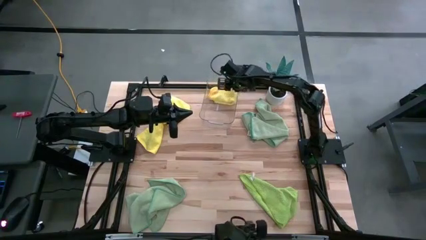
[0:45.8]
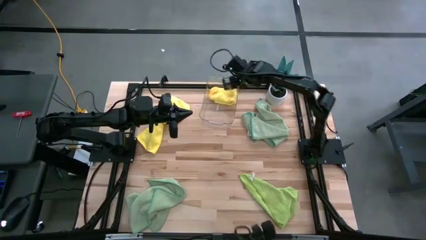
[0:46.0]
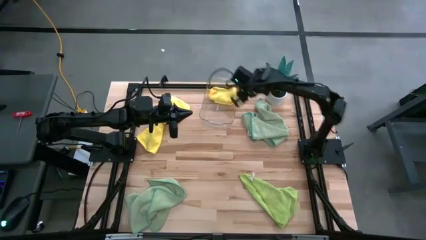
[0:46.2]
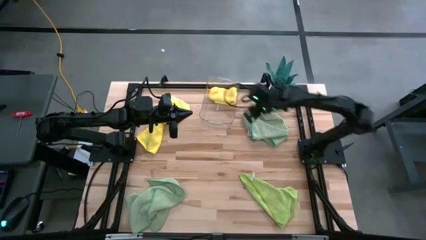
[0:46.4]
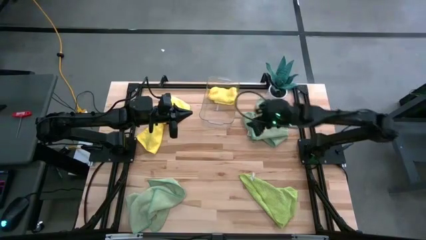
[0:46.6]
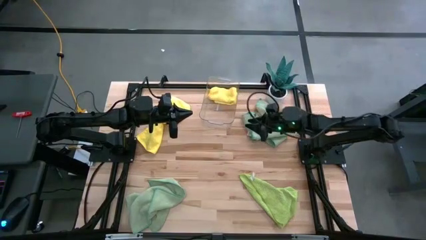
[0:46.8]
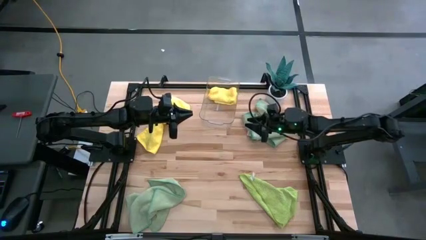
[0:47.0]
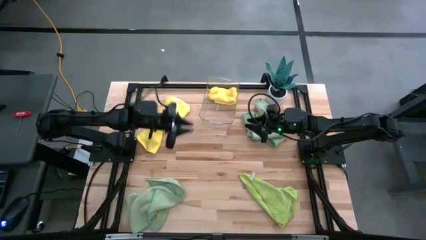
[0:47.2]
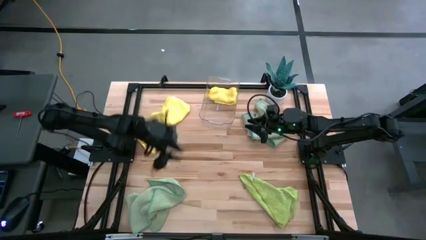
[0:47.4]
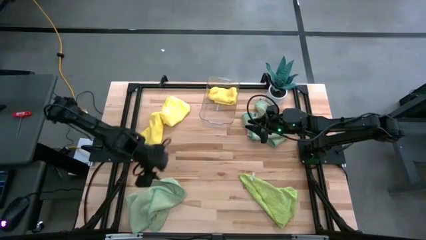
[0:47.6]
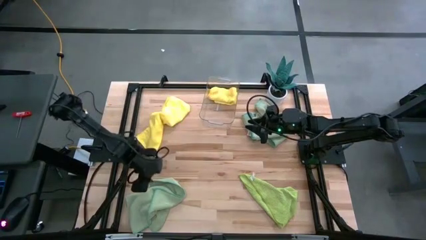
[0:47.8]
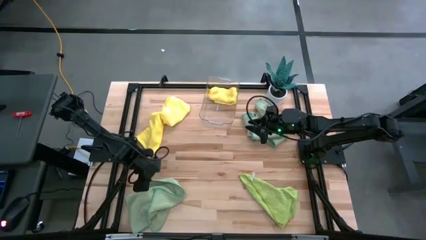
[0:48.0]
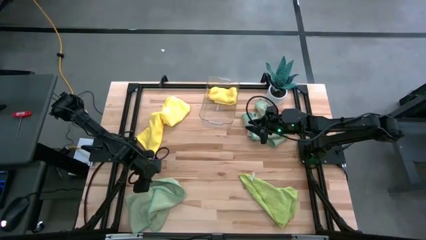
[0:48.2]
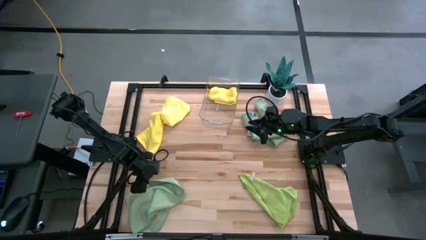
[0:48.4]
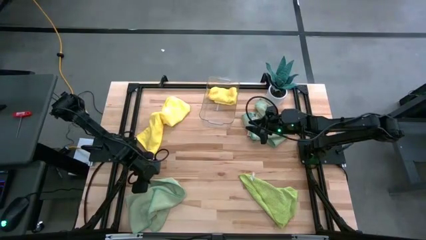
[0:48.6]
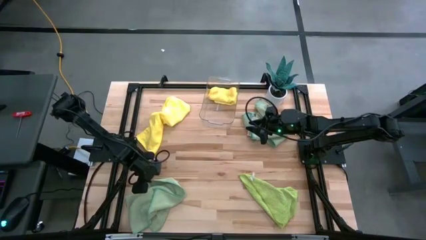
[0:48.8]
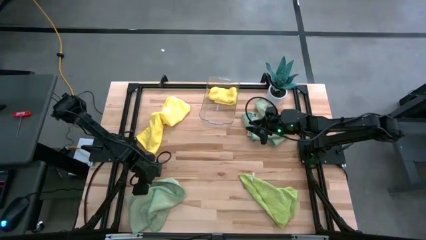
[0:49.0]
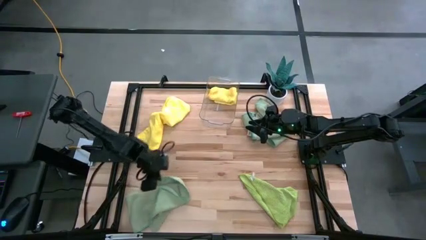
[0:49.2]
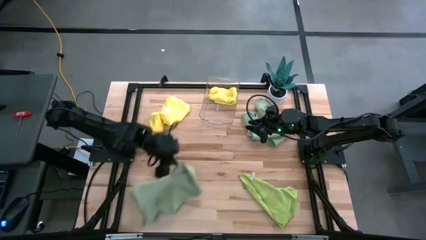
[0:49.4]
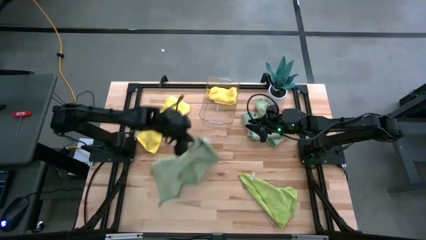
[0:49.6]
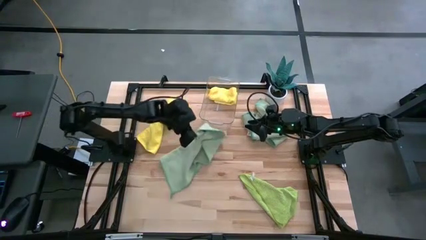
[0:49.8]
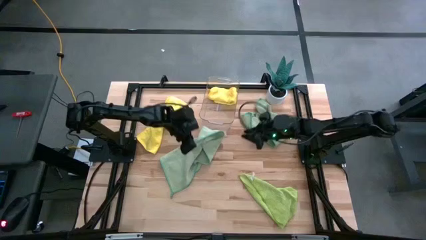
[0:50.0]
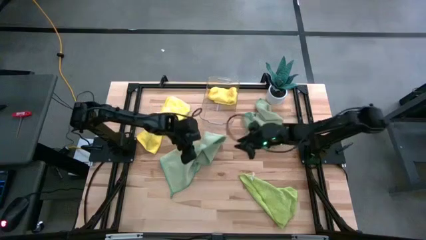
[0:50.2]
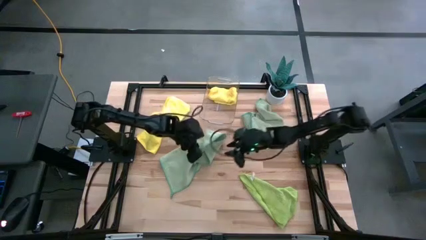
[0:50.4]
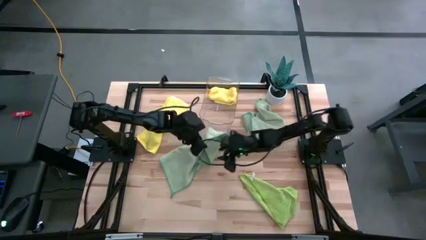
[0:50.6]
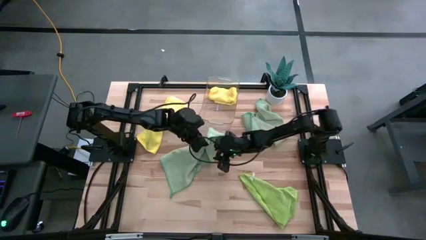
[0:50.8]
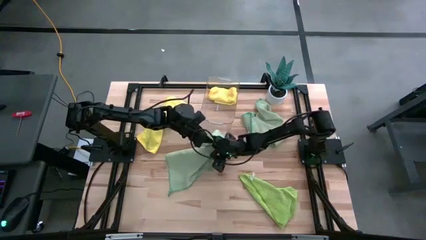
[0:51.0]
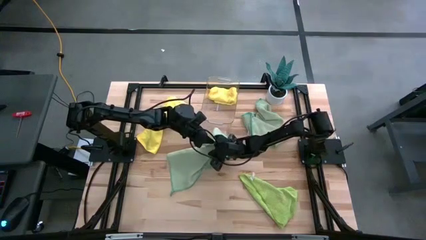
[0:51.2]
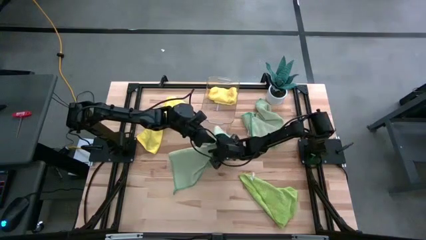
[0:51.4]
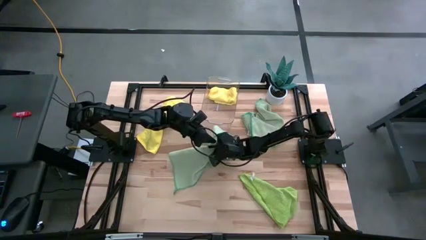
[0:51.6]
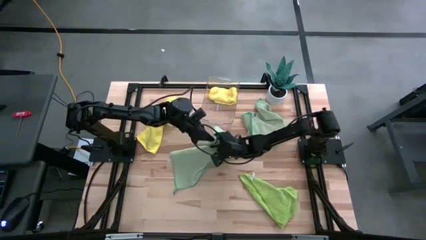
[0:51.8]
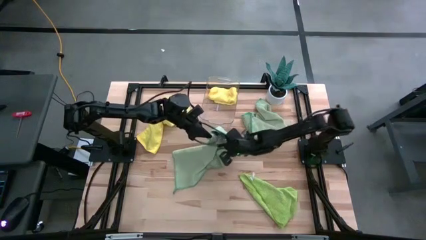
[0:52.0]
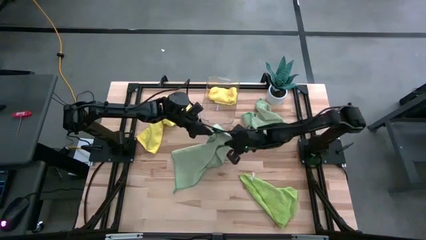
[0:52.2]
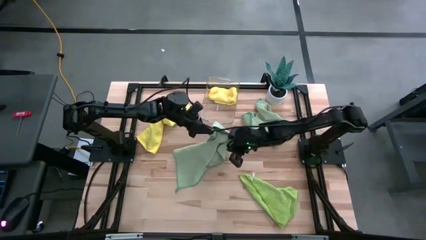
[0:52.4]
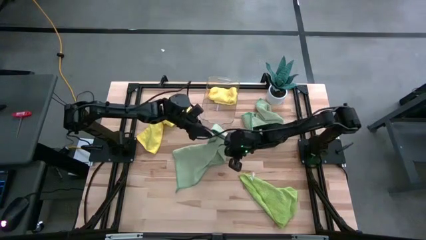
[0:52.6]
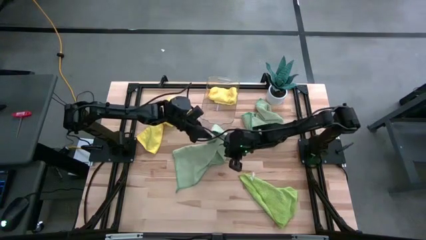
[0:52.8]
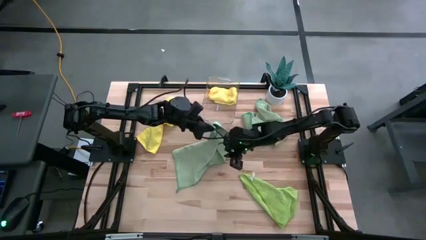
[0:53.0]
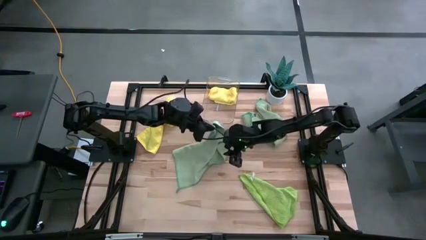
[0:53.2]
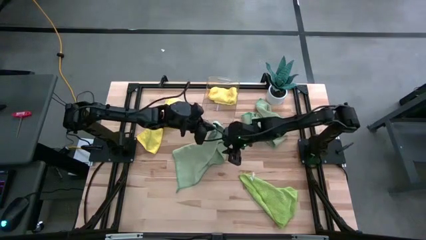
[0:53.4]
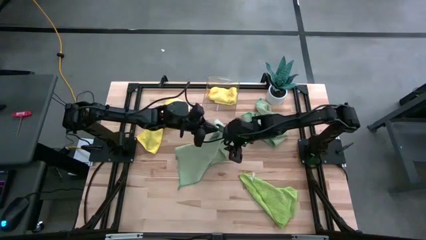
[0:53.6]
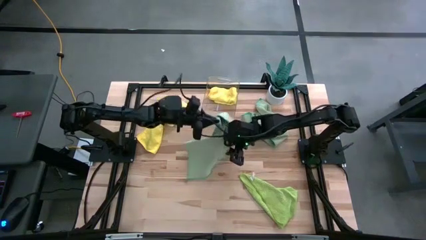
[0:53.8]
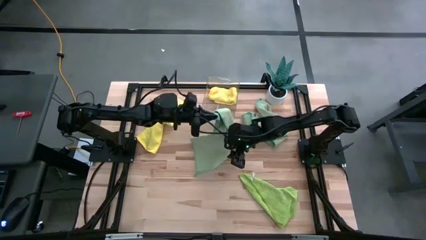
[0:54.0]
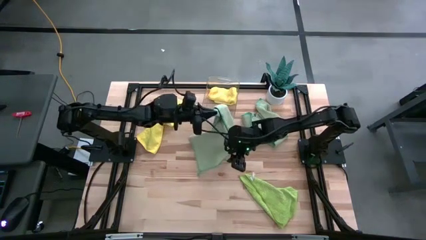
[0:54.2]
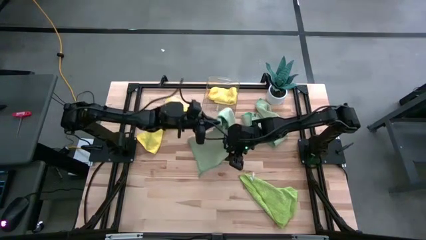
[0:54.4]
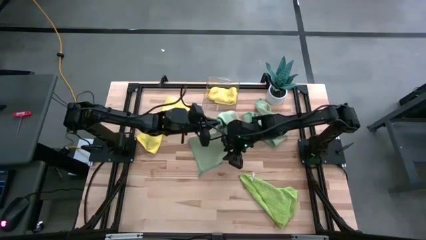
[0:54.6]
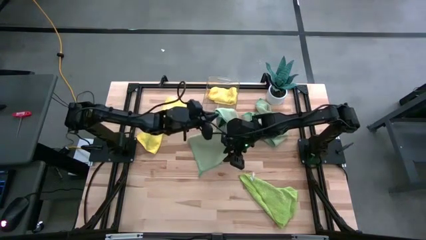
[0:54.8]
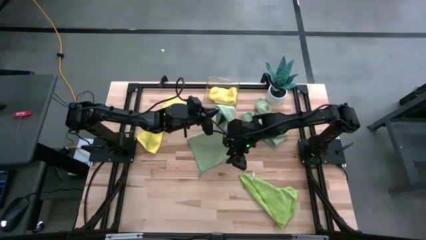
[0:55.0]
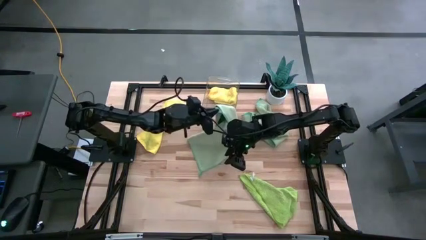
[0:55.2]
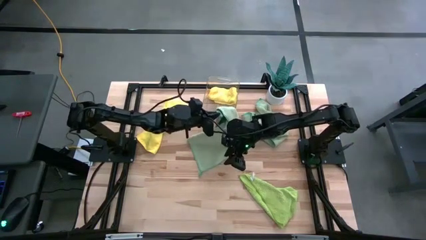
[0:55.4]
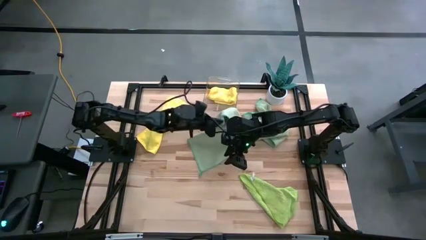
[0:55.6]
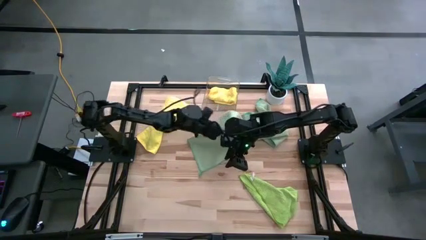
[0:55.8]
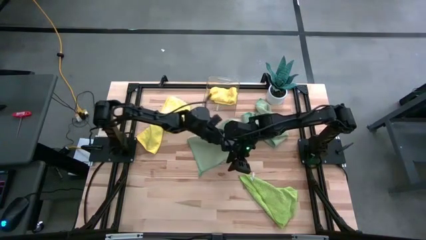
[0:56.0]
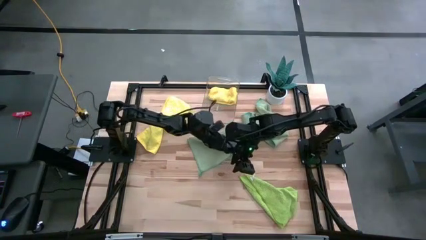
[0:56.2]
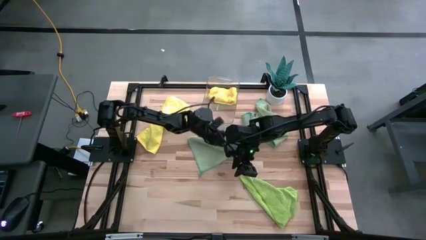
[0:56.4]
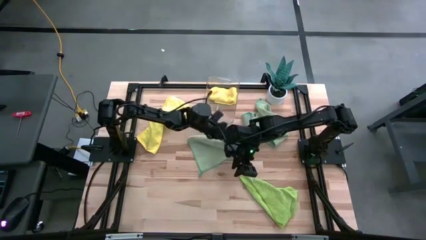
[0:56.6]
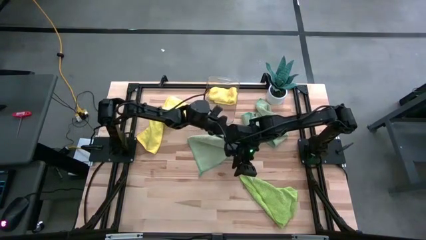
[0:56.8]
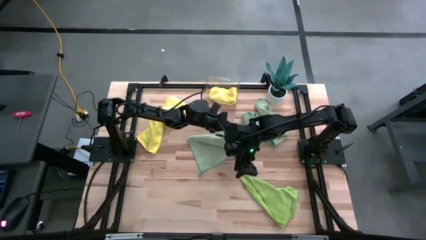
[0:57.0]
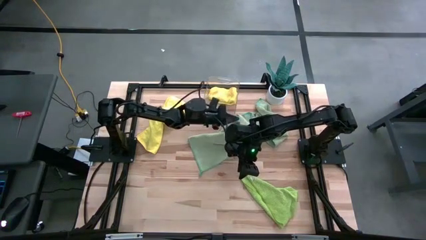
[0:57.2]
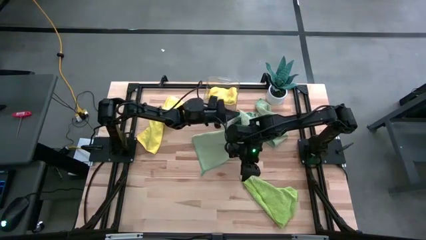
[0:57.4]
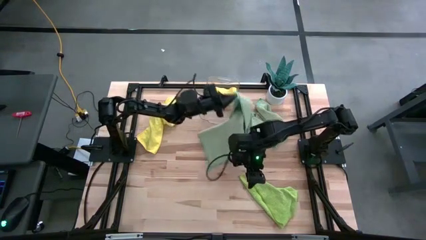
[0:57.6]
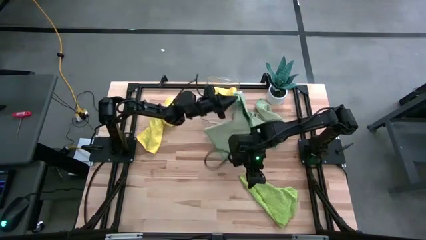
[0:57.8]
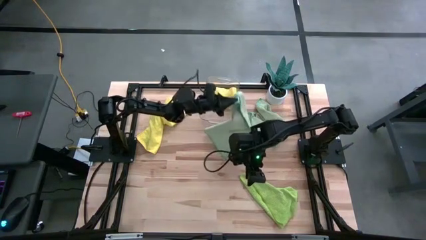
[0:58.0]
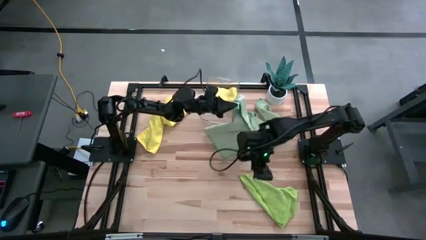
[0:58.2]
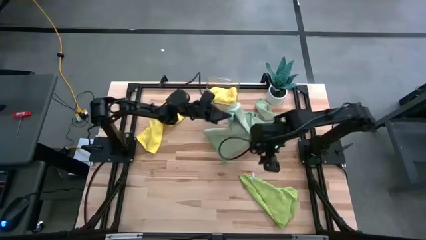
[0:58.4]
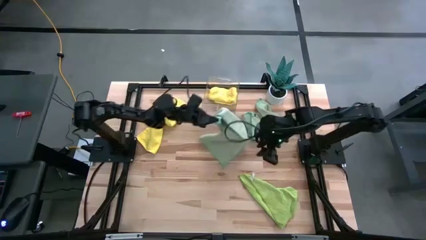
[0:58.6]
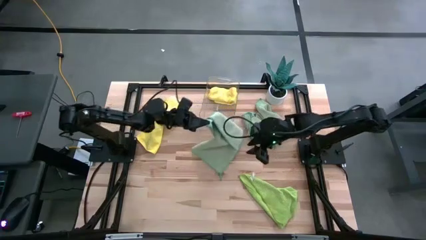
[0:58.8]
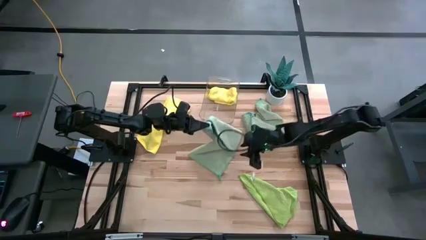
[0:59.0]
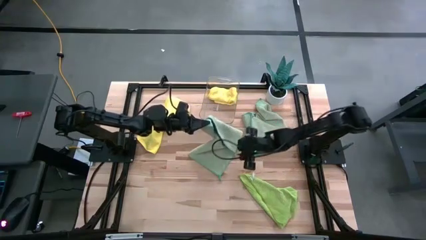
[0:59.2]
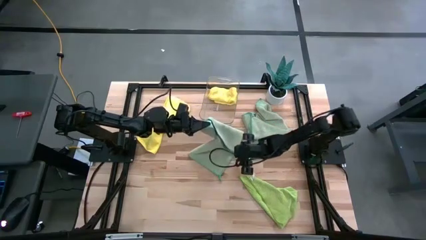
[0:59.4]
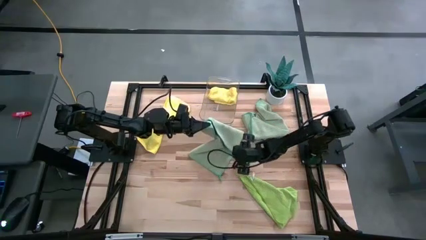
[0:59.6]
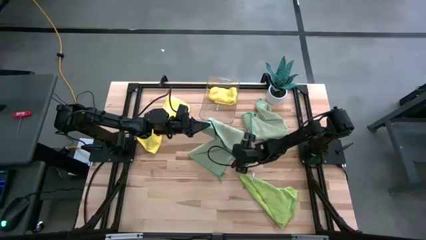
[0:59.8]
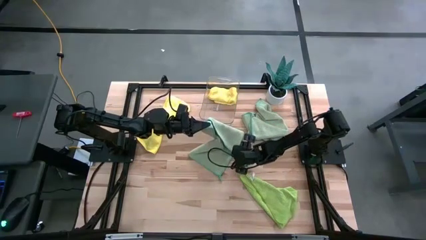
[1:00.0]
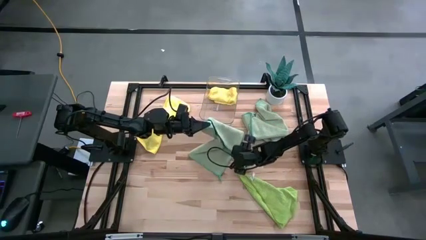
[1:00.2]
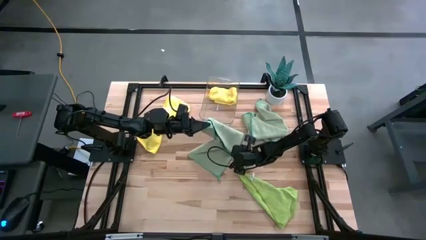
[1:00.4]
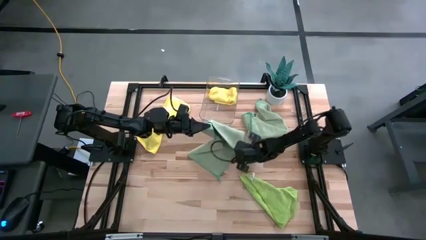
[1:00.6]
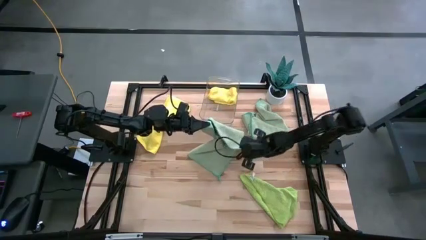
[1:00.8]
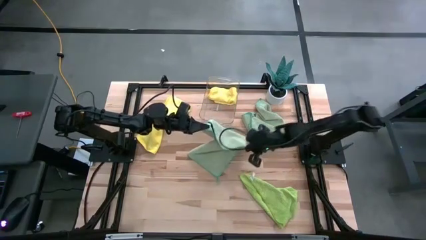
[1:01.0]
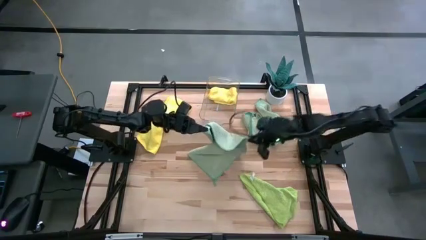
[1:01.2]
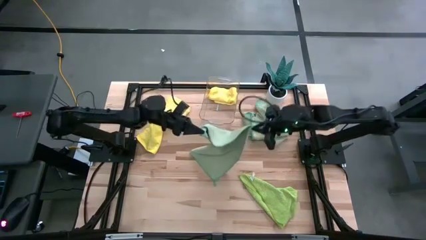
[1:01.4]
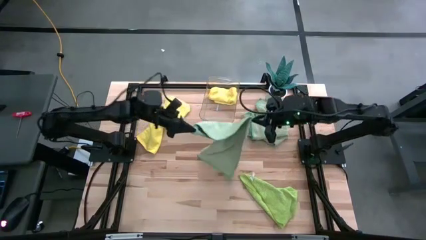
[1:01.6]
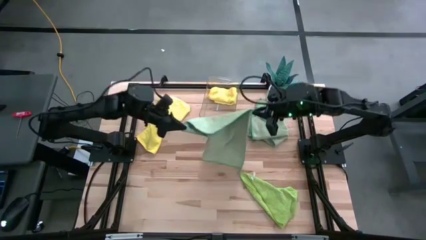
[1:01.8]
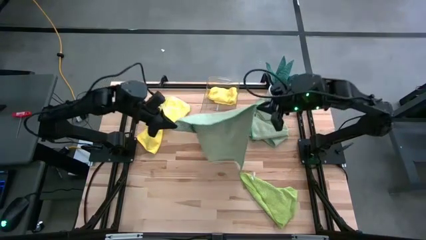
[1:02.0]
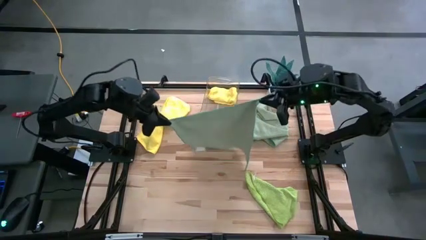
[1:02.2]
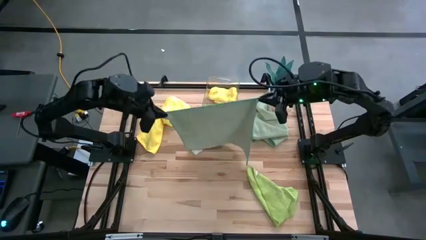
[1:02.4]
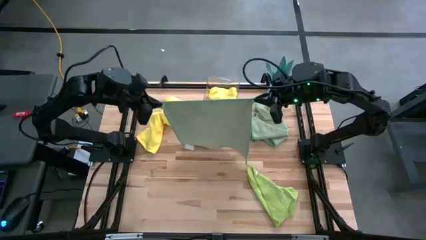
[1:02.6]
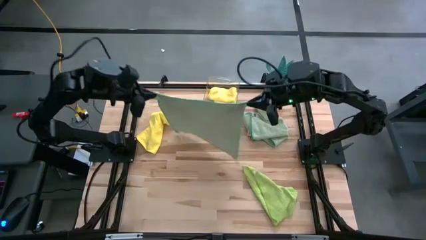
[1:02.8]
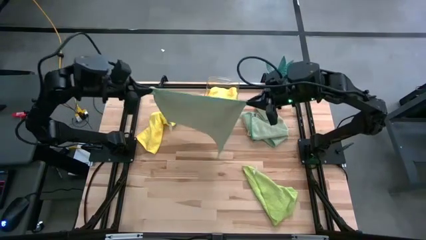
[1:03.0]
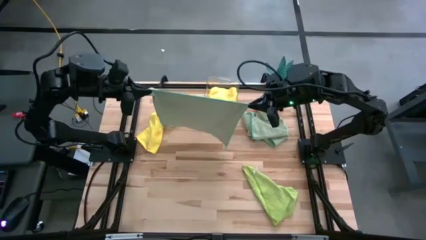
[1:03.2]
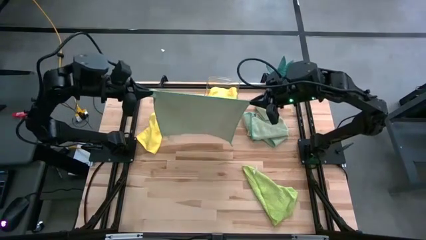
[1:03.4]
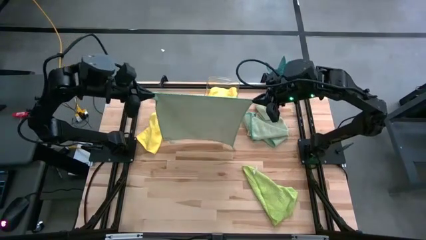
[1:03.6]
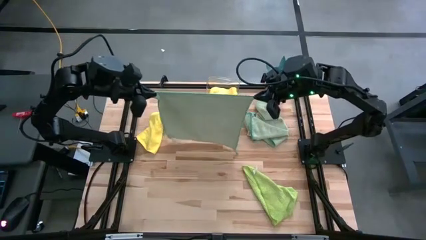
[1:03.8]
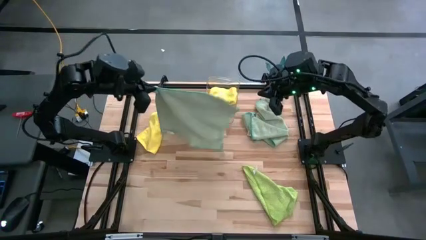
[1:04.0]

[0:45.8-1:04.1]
Task: Fold microfiber towels
Fold the bottom left blue towel
